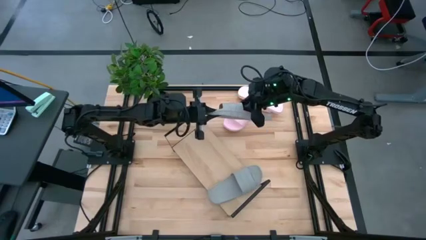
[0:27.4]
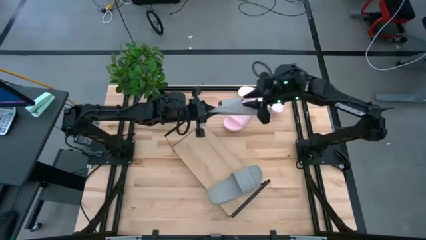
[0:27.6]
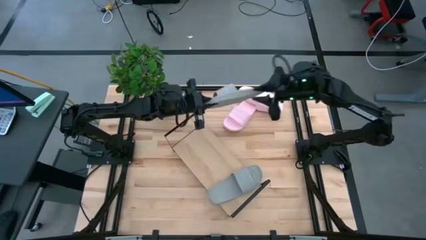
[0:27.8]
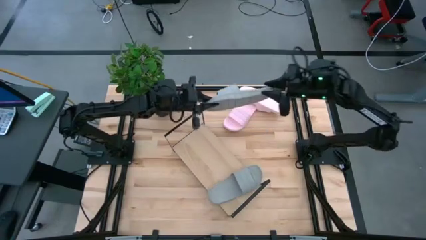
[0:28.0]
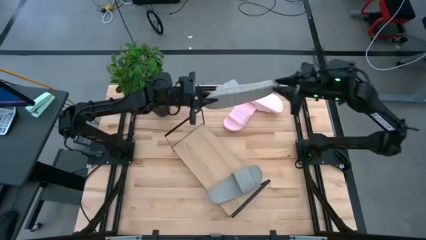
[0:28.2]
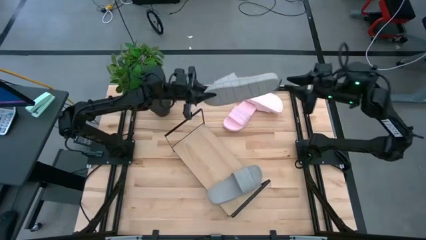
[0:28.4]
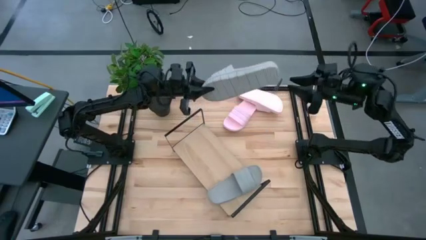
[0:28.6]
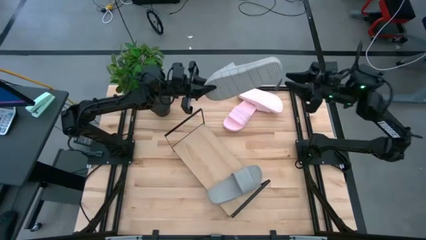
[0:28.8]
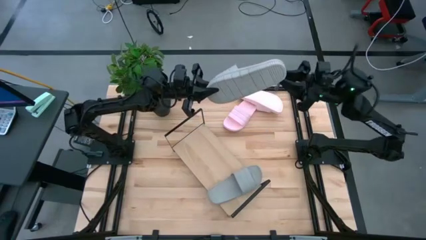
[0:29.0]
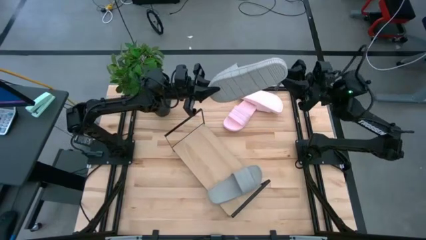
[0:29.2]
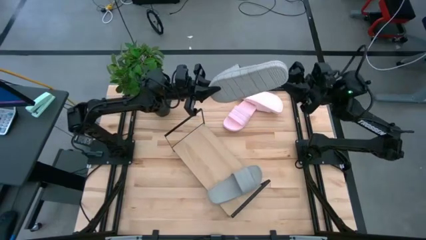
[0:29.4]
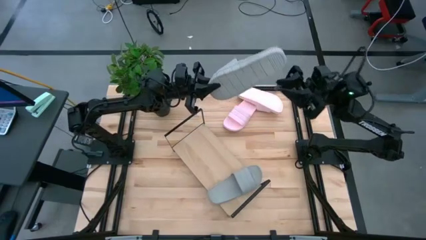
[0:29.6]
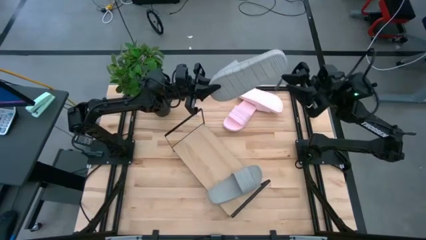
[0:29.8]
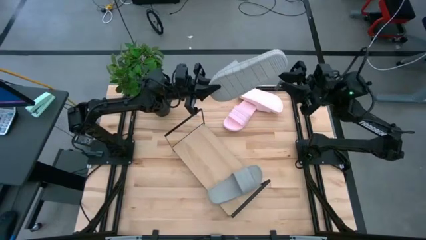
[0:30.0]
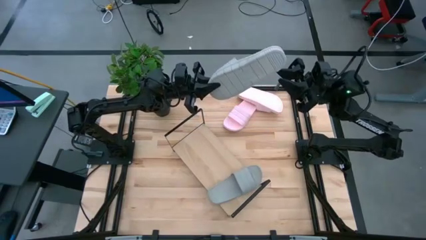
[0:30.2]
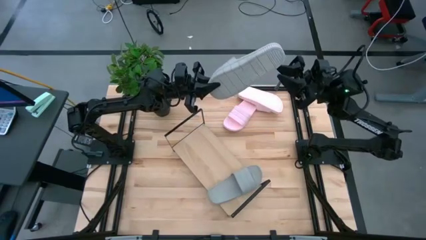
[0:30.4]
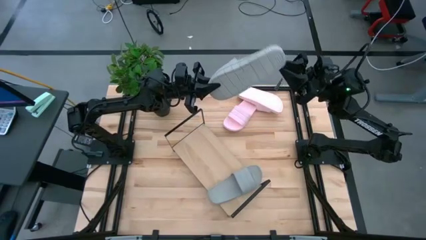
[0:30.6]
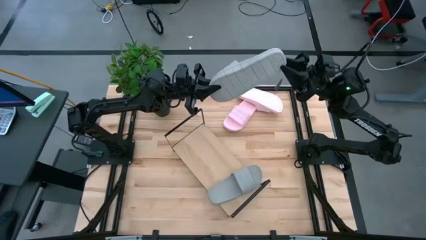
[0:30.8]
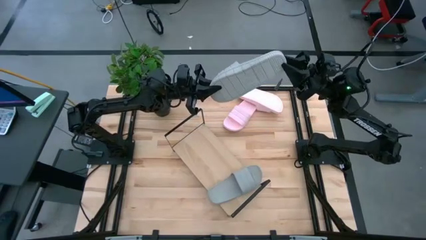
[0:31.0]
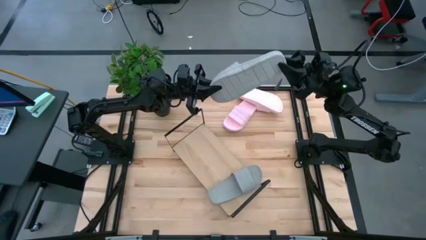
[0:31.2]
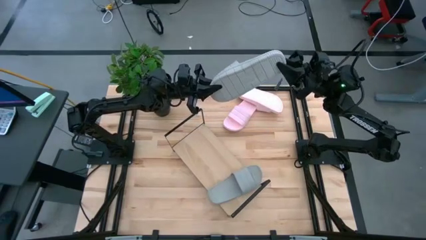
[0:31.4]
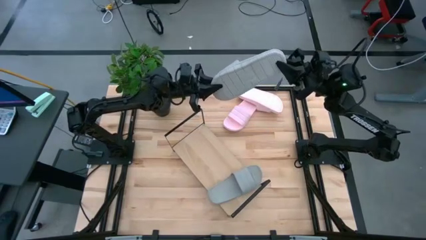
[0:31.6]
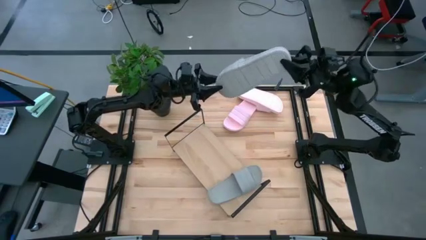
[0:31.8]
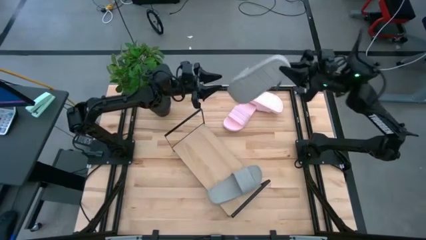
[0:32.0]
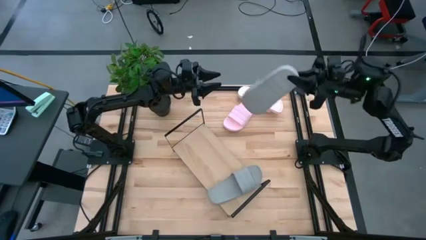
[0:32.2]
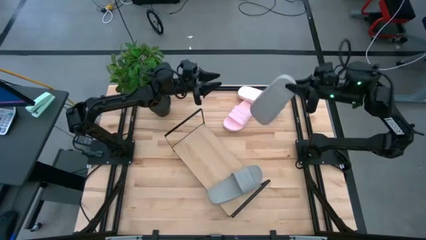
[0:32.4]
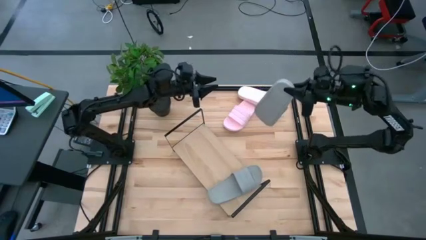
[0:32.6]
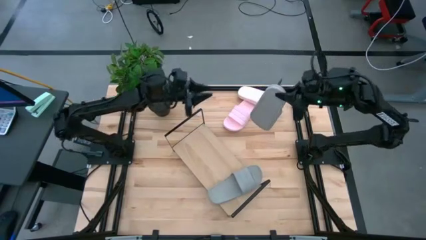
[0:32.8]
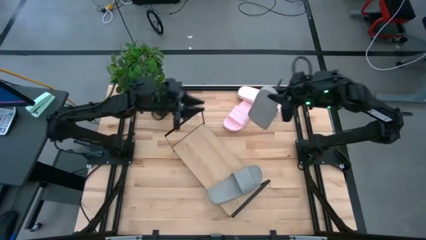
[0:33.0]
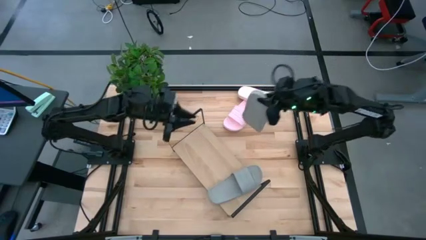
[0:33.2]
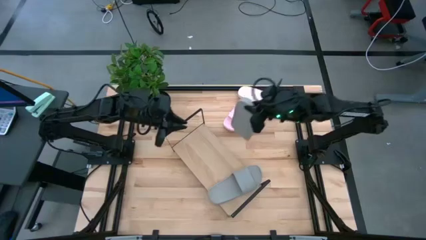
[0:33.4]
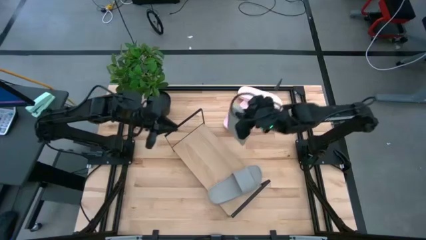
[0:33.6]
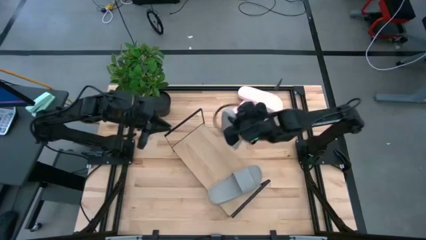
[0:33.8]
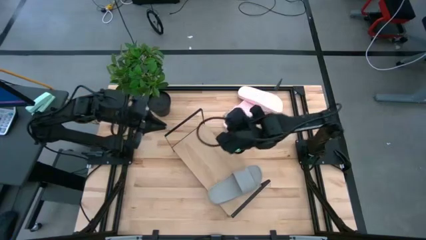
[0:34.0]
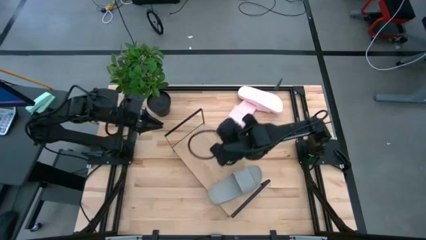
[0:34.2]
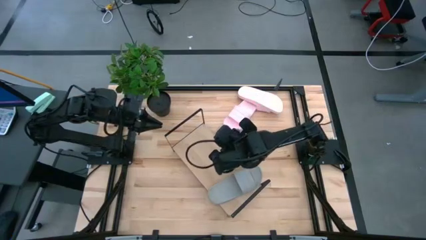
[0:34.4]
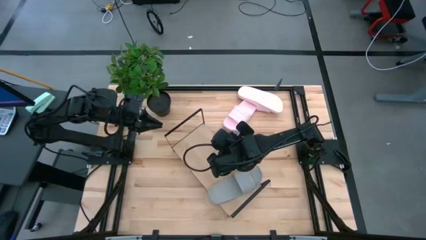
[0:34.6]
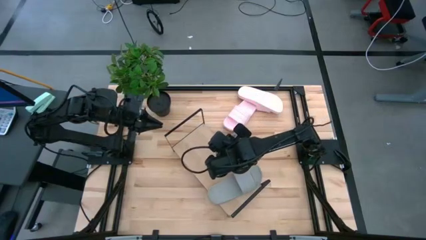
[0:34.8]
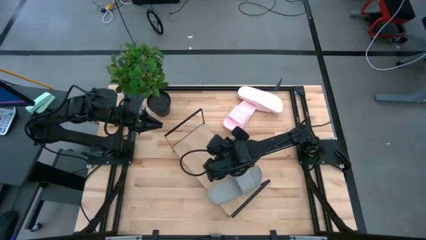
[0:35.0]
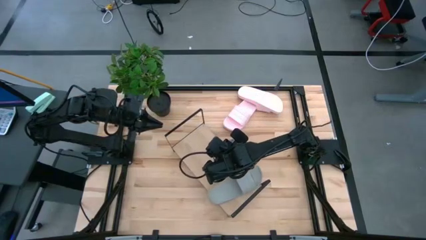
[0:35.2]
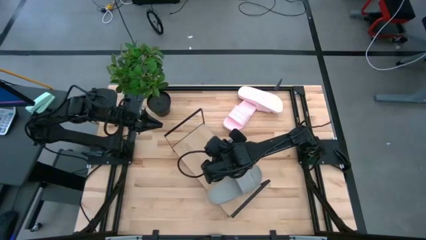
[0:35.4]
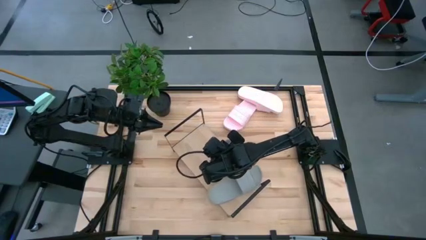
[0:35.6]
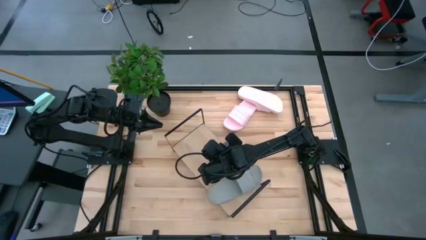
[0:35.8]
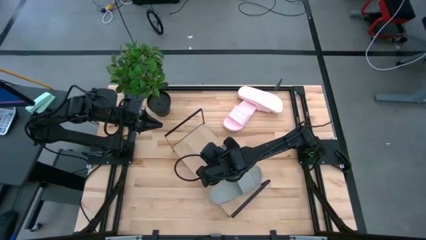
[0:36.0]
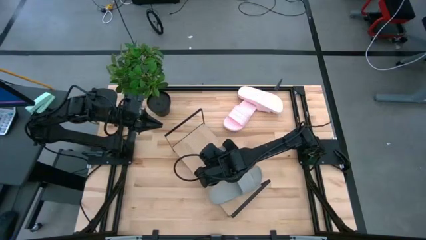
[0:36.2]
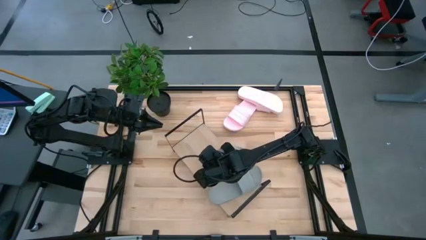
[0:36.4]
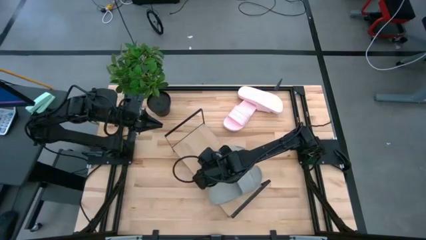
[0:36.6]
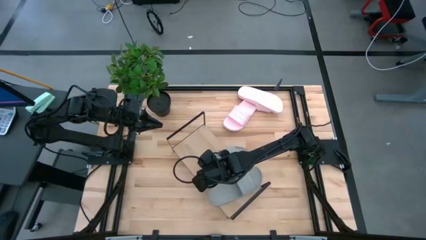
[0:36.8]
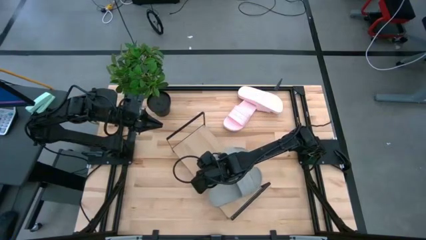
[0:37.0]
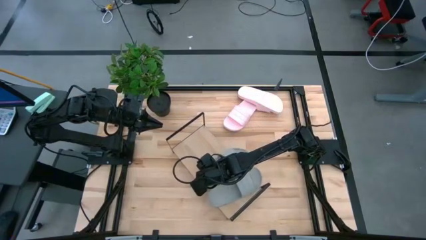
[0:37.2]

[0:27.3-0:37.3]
Task: Pick and place slides into the shelf
Put the gray slide on the shelf

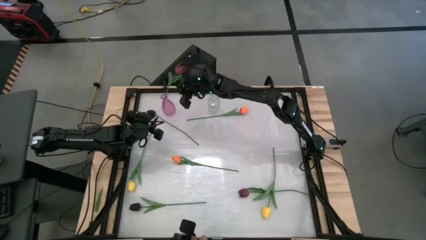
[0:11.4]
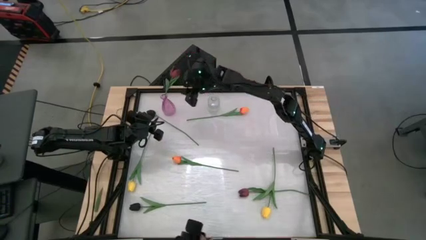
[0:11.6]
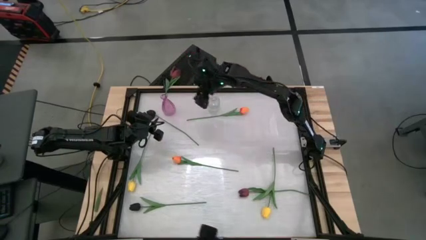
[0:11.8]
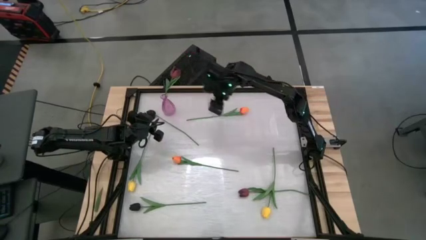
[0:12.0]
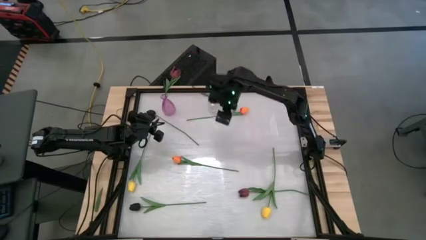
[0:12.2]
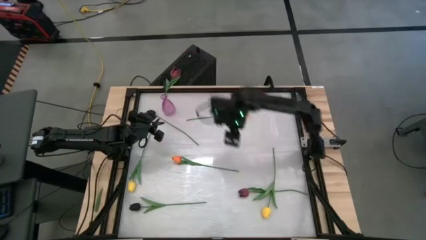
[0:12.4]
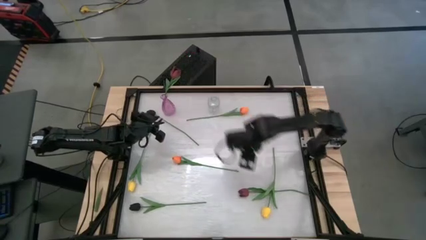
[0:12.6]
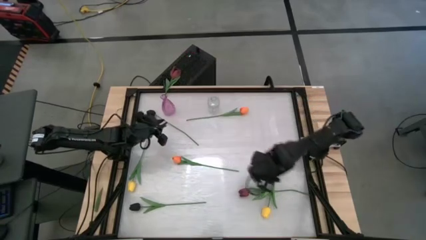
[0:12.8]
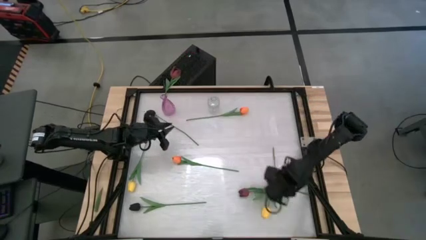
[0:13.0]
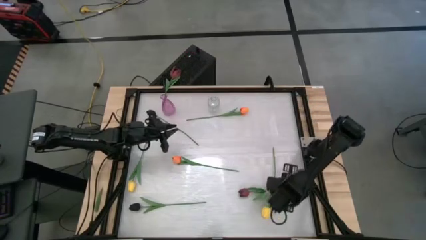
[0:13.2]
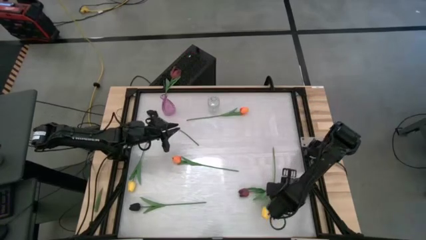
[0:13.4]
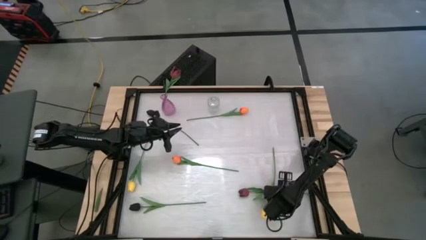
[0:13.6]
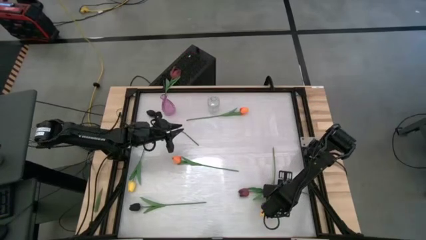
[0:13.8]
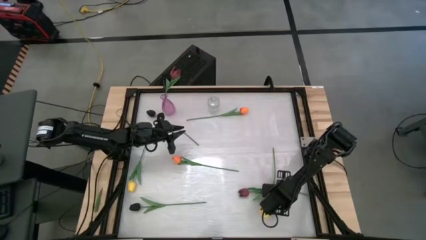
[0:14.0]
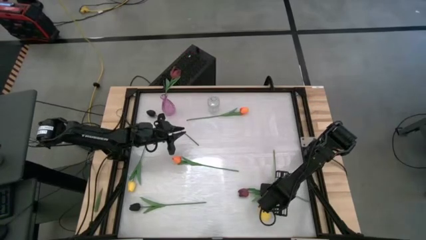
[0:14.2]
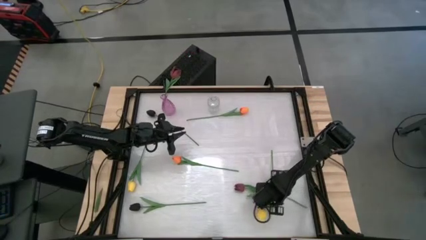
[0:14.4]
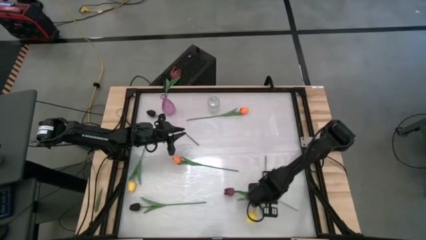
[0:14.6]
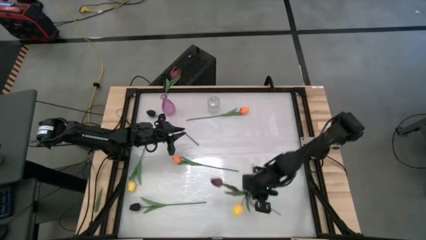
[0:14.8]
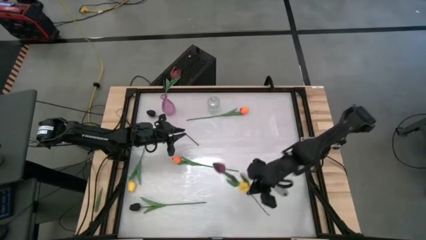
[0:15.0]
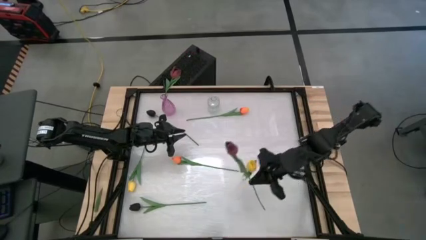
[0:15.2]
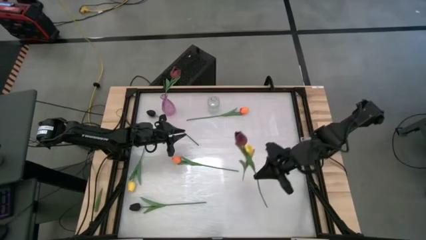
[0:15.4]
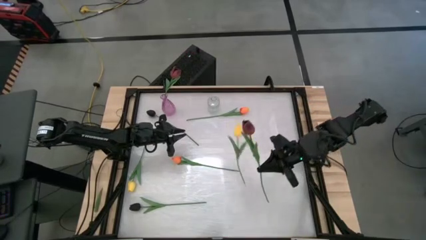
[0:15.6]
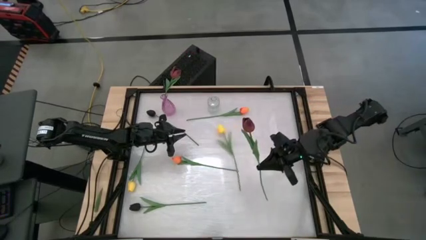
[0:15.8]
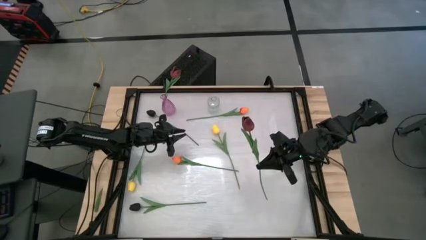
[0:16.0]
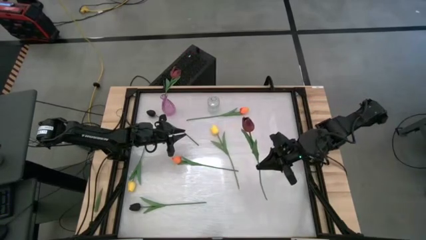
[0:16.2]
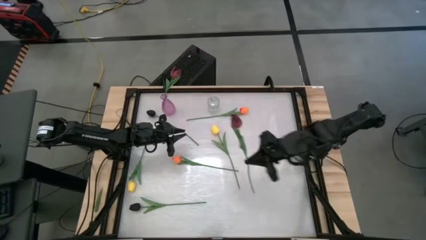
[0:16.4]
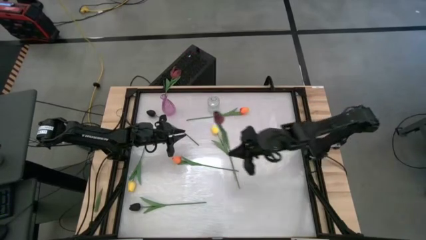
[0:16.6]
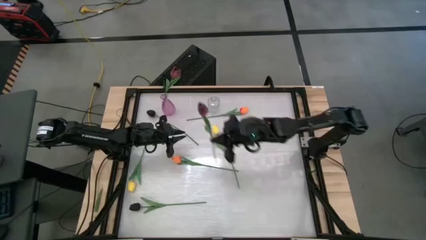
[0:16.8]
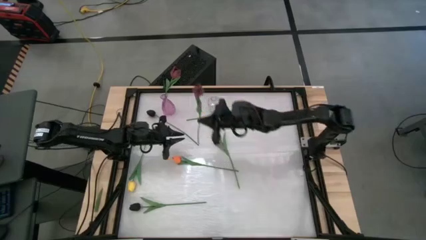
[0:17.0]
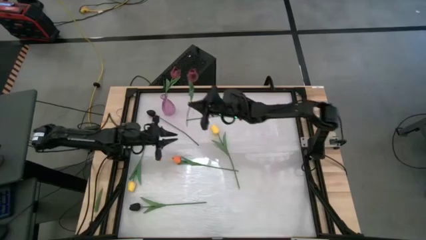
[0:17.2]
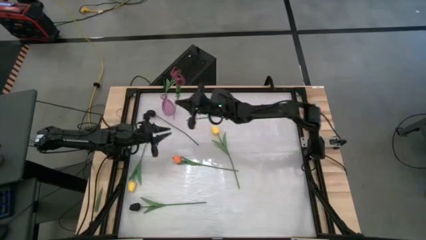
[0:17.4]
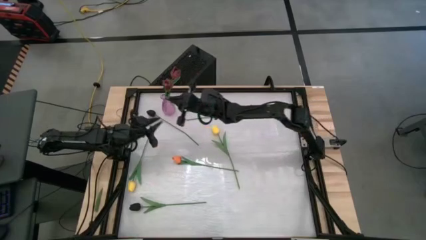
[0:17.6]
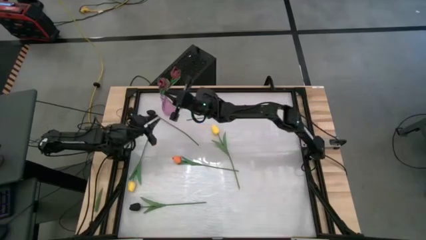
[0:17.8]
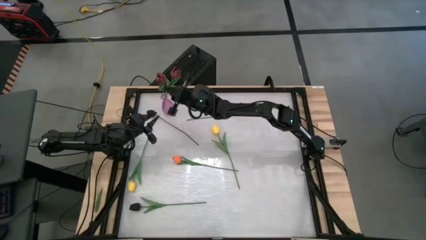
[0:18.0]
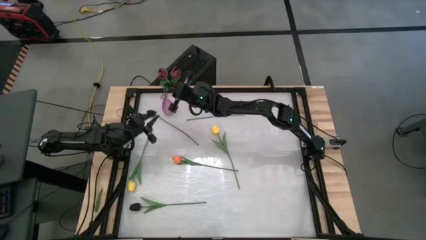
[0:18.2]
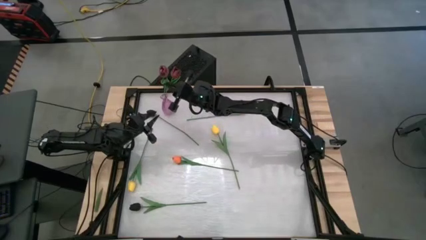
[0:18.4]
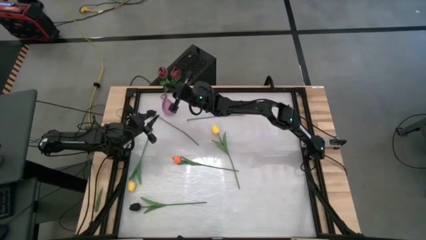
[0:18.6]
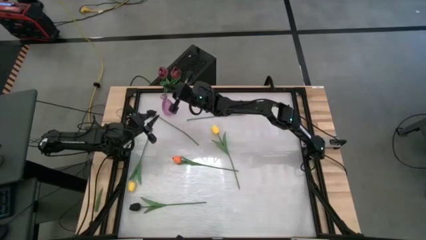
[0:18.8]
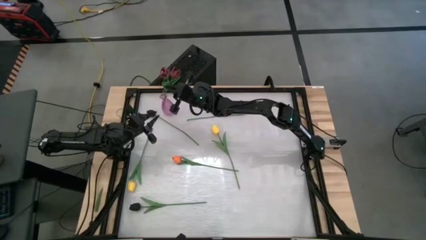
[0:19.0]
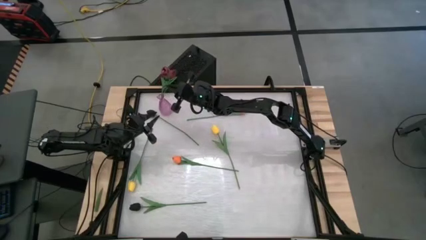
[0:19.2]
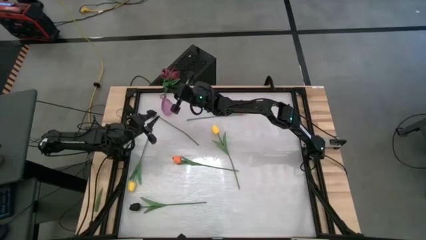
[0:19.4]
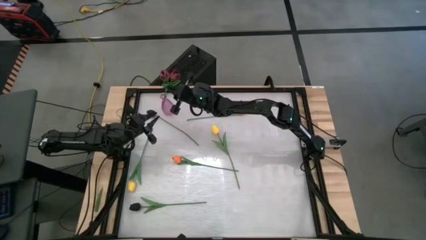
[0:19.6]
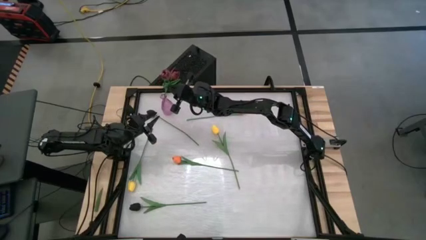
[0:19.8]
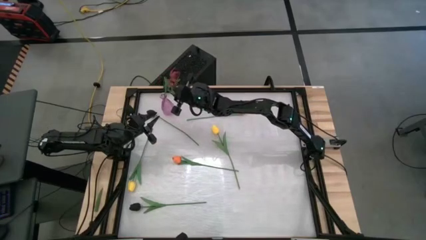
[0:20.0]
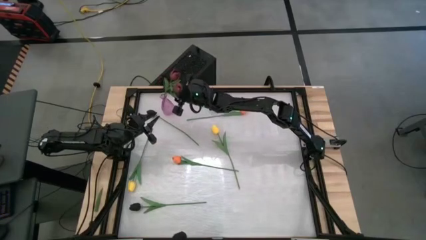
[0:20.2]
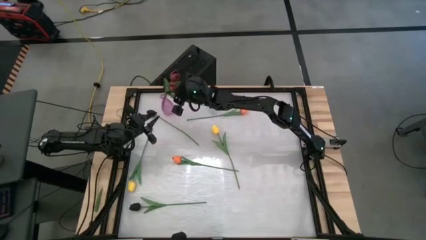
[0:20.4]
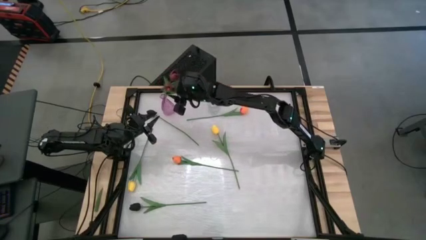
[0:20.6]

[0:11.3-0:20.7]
Task: Sort flowers into vase by color
Put the red flower into the purple vase
